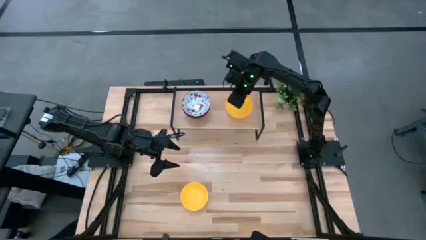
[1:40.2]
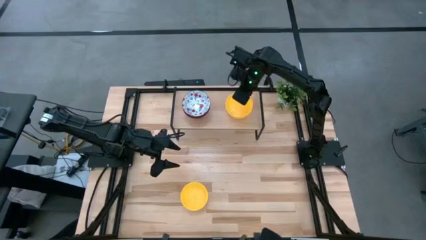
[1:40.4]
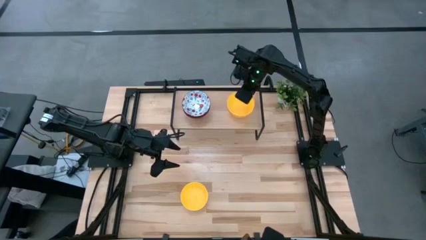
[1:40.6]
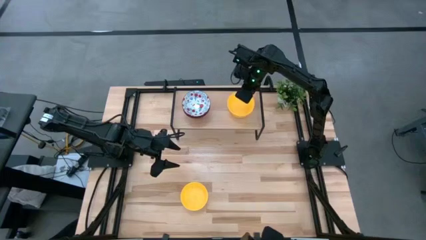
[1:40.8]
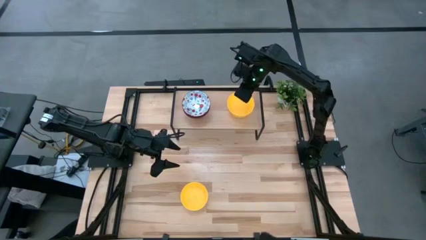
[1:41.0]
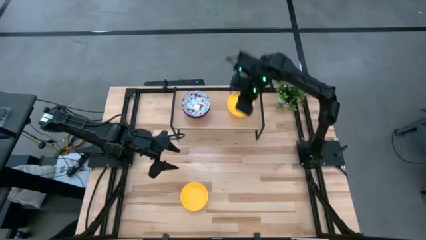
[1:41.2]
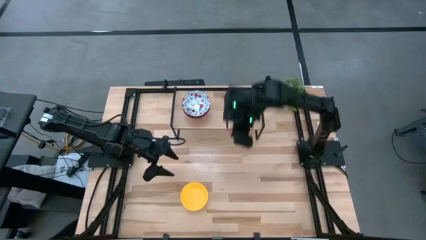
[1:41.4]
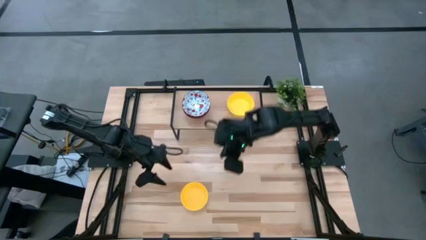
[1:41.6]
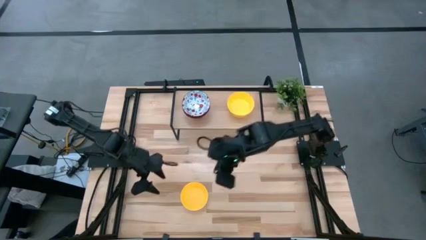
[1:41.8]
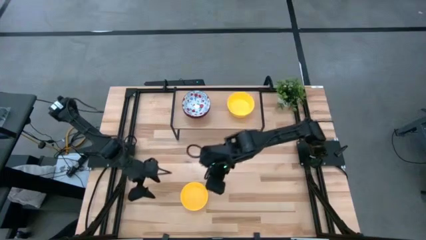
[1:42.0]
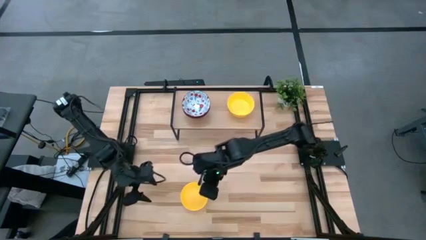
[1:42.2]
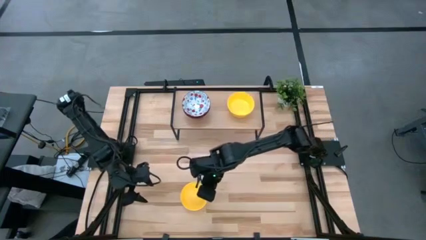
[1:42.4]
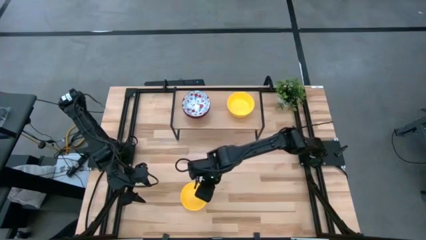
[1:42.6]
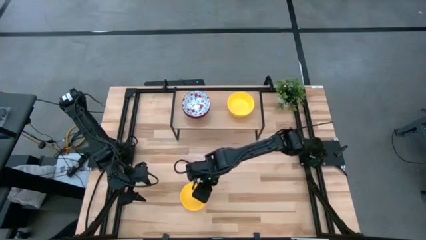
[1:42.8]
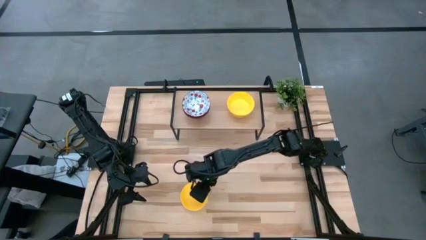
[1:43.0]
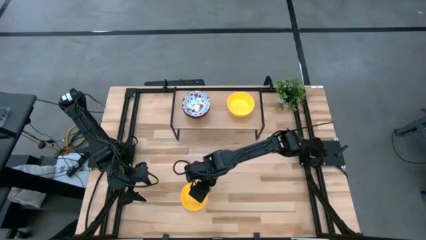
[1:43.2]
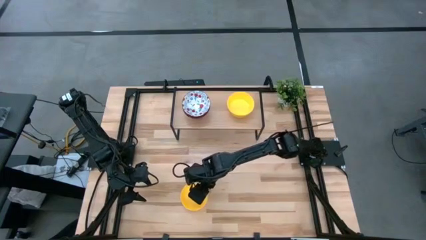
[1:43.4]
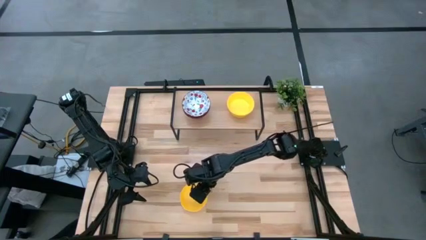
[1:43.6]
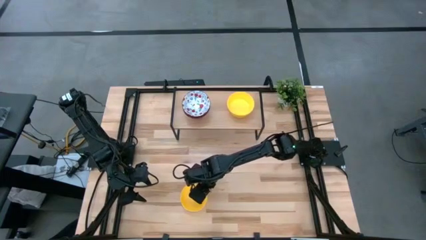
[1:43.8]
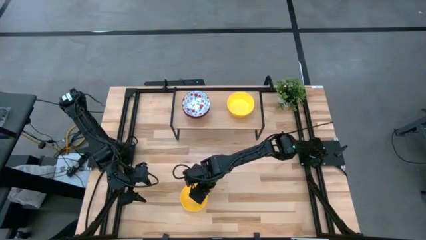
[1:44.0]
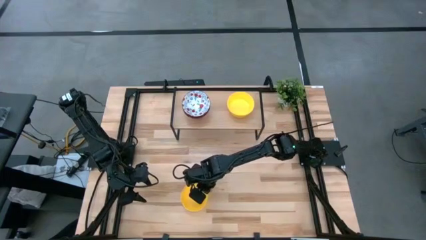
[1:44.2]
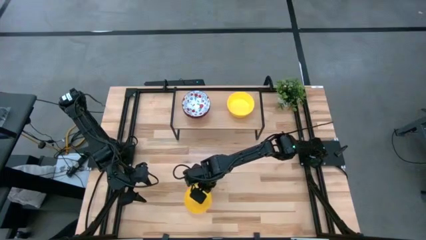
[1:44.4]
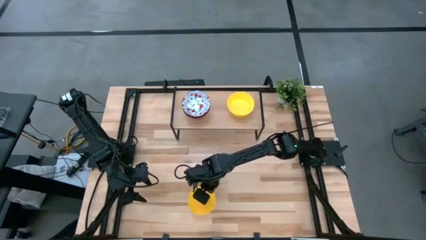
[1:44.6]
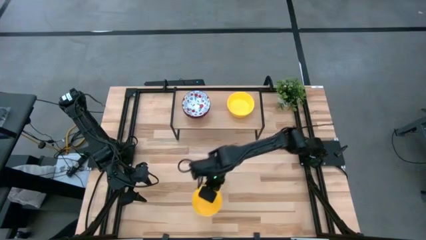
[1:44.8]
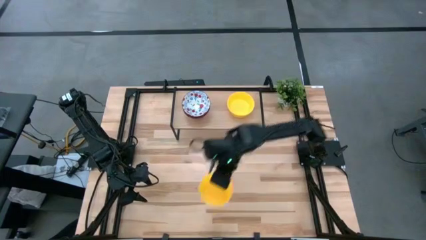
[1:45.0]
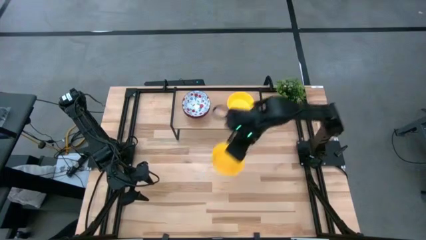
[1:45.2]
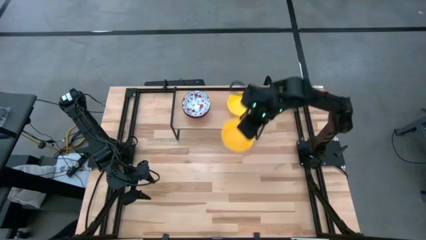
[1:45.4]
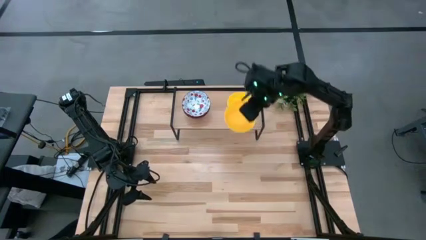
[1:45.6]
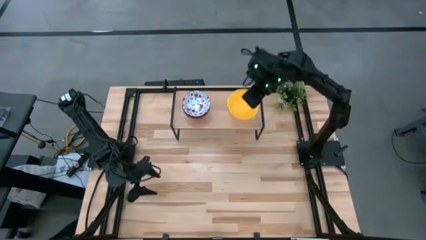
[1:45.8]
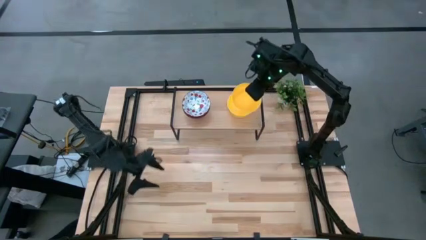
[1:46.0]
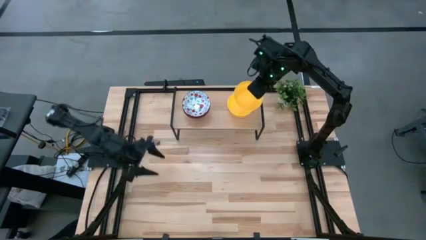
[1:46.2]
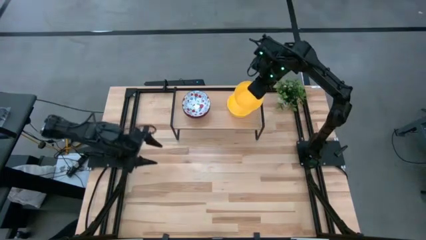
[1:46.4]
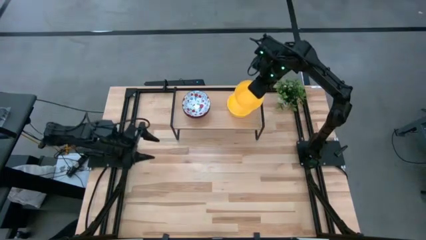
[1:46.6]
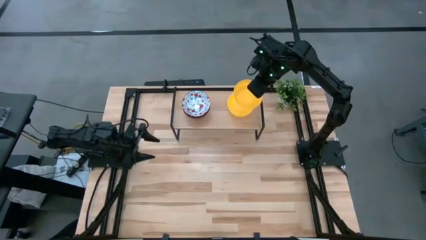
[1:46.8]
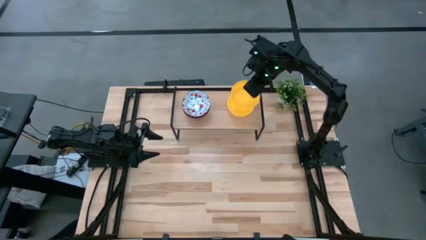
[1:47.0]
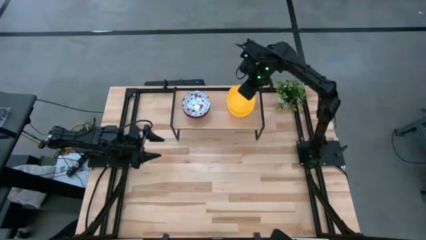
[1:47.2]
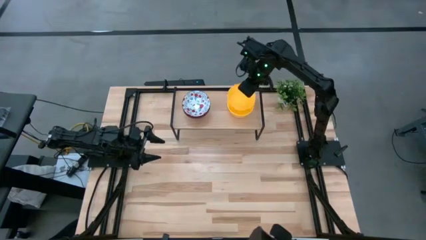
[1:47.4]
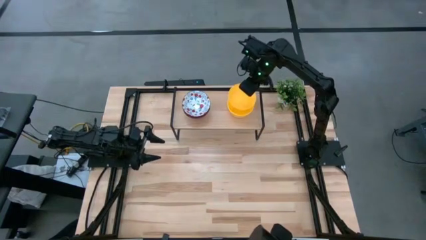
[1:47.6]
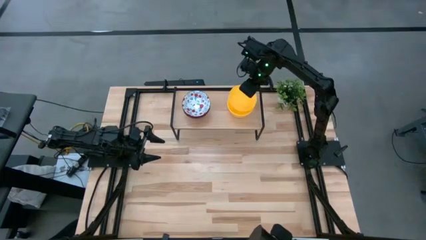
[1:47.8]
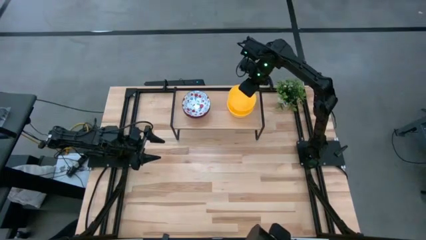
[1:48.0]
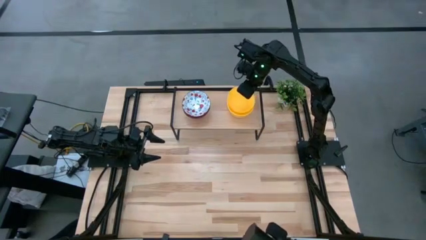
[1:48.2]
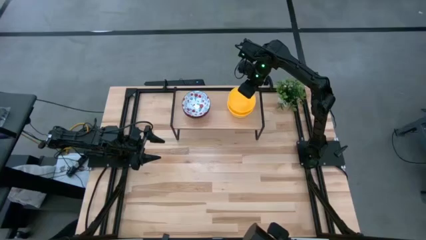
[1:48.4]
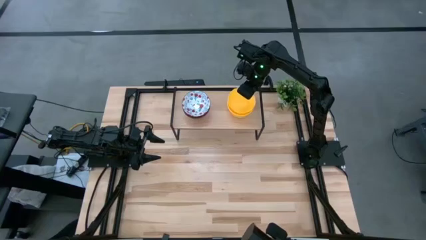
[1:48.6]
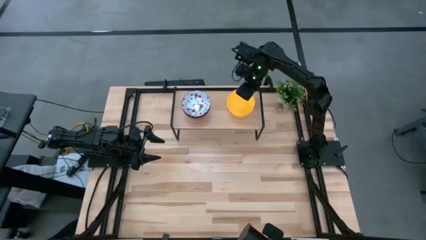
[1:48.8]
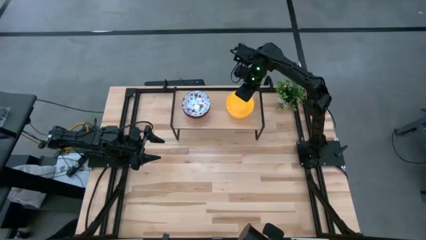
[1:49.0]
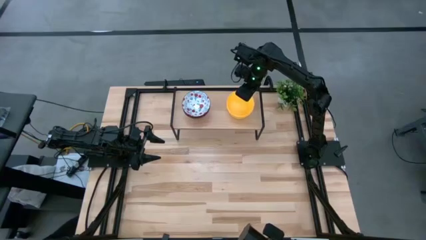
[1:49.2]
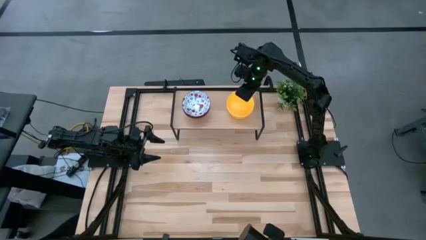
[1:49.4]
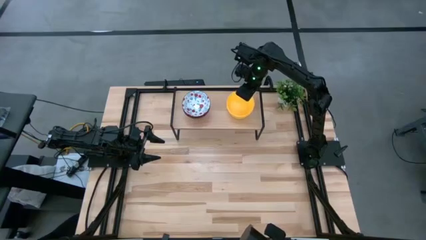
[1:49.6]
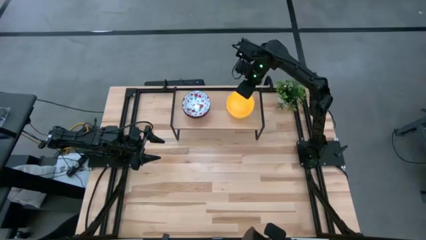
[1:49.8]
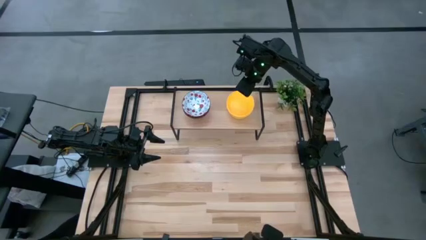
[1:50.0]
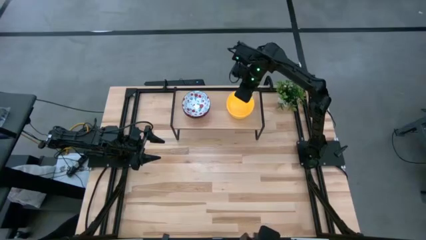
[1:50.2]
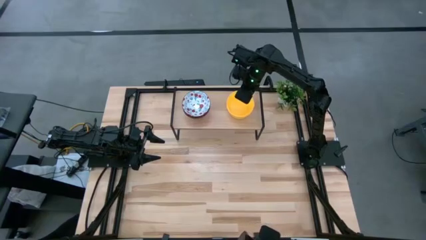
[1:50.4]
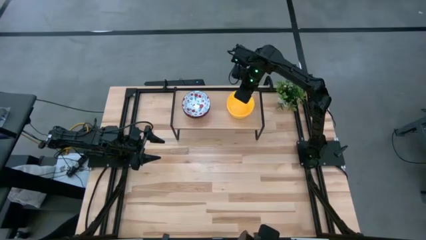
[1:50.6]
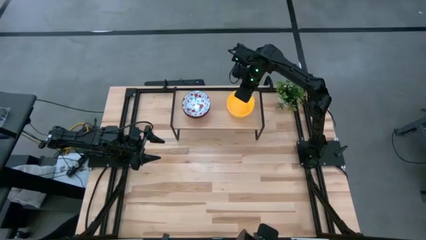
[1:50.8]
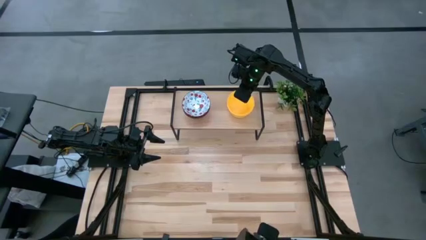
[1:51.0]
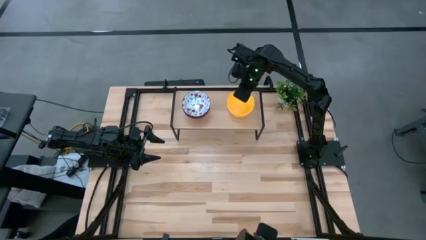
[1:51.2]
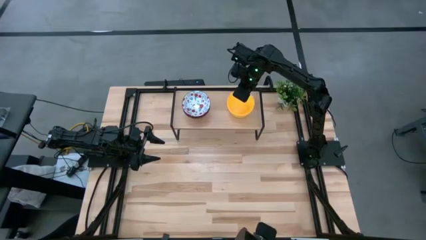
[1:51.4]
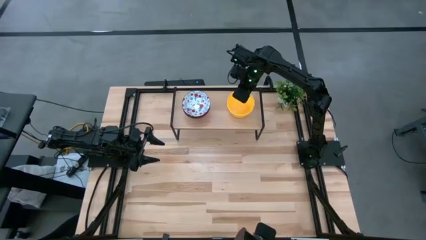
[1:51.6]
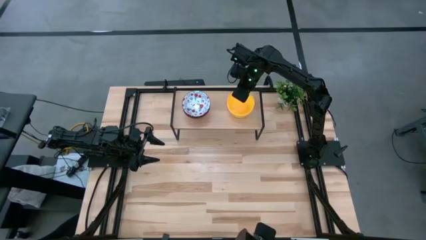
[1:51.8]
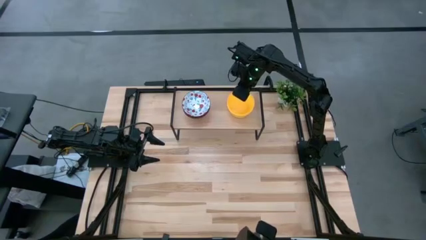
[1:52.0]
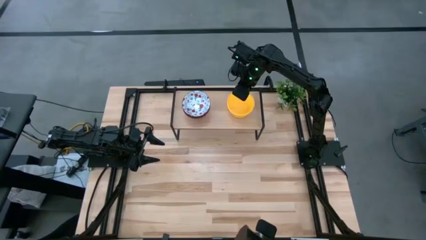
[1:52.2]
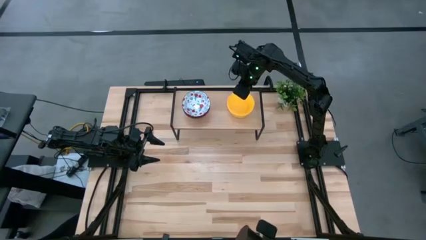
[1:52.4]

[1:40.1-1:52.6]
Task: Pick & Place Mini bowls
Stack the yellow bowl on the yellow bowl on the shelf

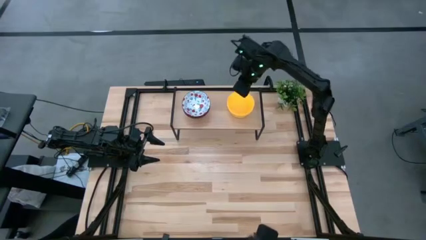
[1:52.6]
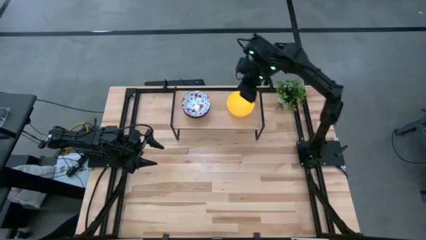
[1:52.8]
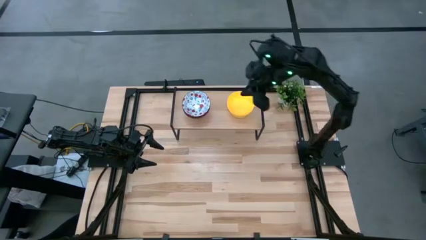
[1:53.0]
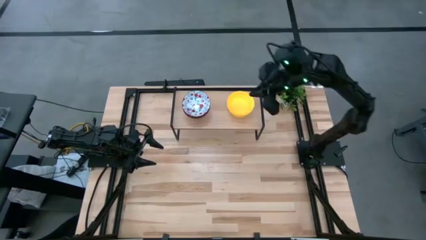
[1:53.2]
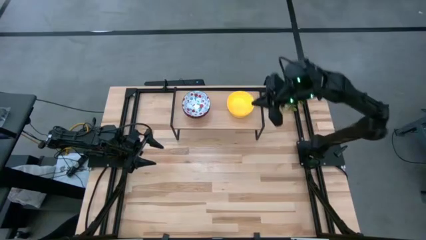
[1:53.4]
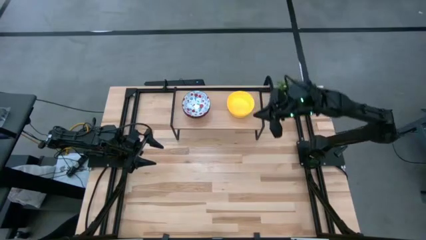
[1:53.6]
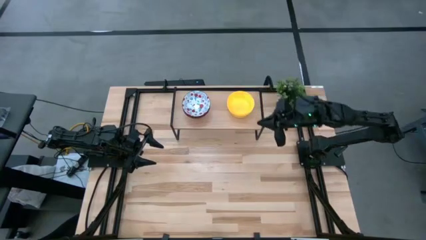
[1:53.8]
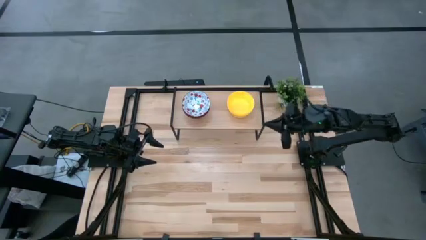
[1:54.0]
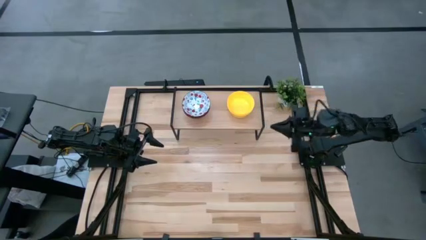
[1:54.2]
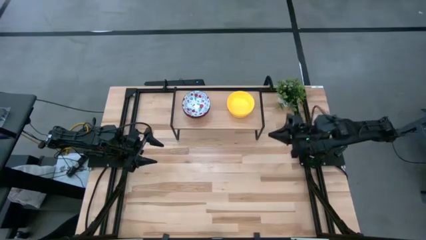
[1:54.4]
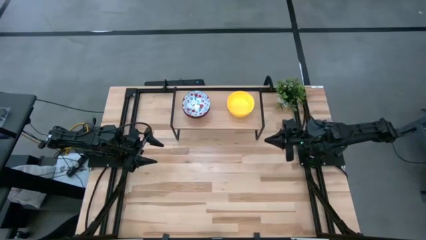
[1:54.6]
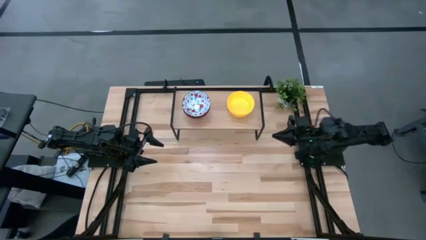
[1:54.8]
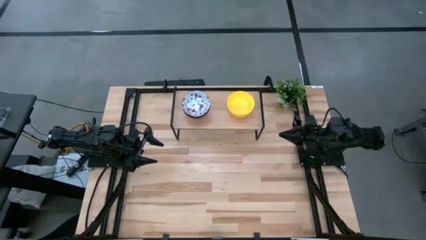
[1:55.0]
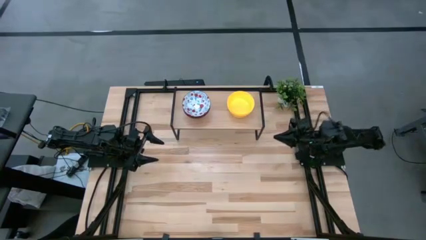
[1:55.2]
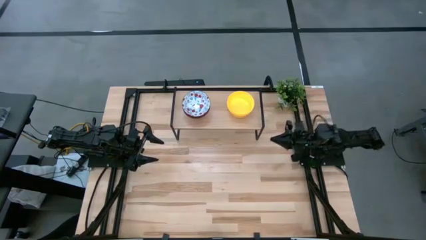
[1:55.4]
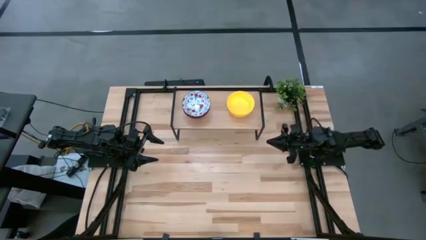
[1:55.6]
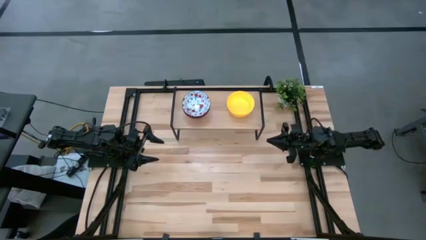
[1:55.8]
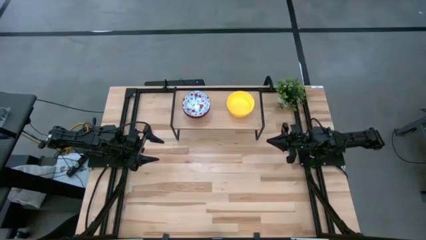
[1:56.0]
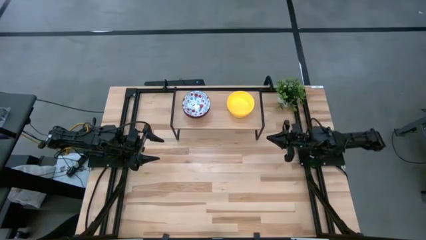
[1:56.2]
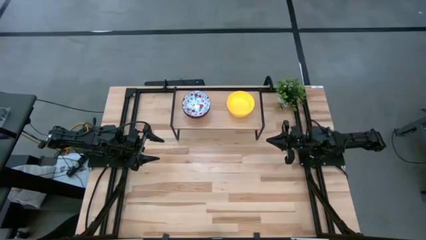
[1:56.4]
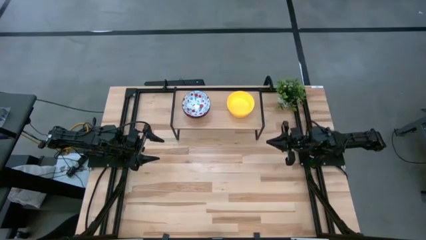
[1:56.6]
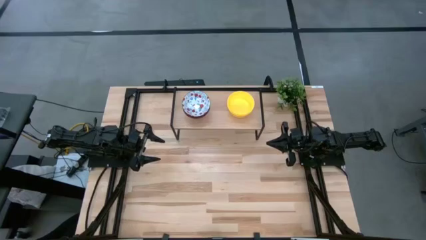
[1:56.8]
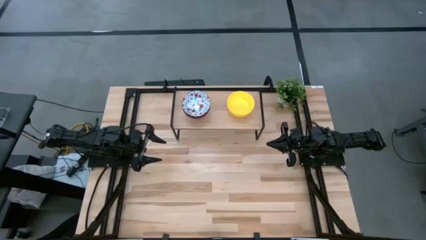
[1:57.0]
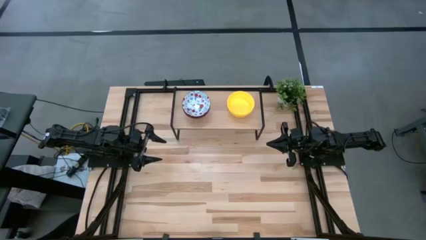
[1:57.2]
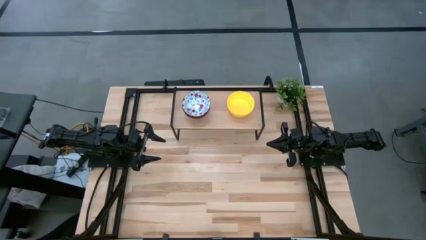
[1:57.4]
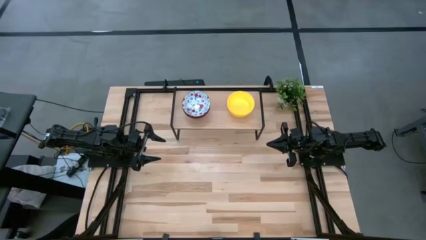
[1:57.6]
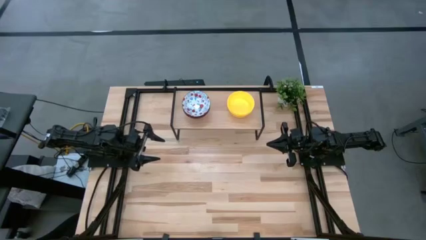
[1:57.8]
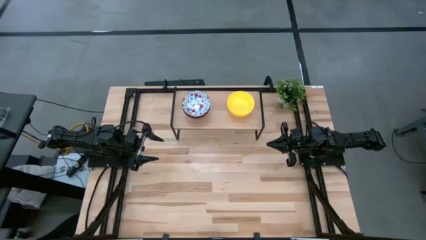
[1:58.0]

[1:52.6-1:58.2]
Return to Home Position

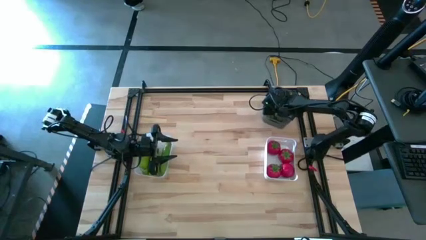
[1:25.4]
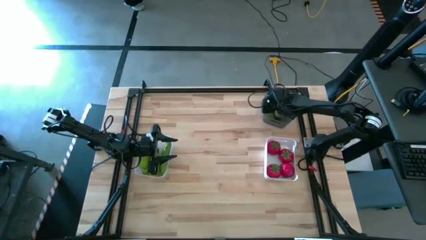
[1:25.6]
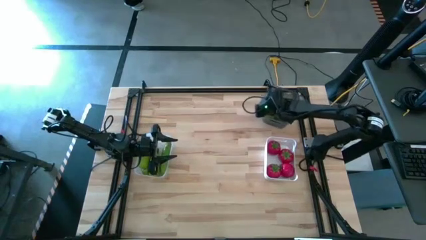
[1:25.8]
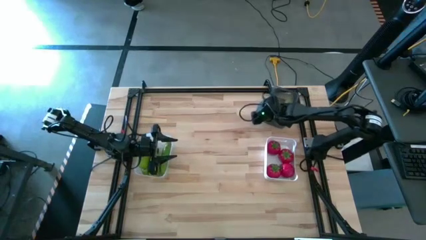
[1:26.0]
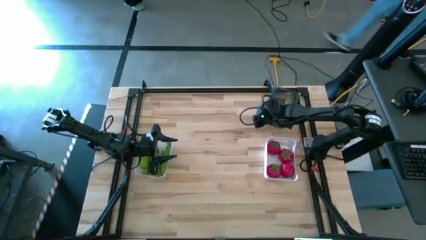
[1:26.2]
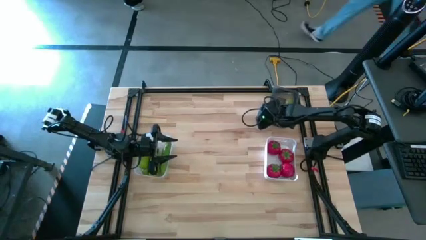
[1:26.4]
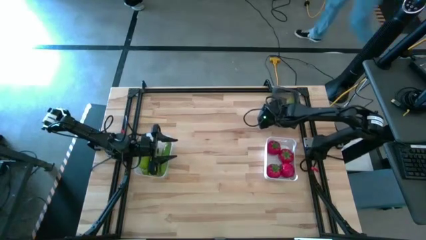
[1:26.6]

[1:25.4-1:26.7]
Task: Sort produce into baskets
Adjust the black bin
